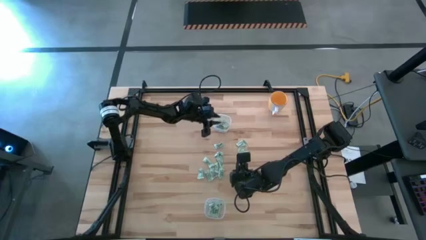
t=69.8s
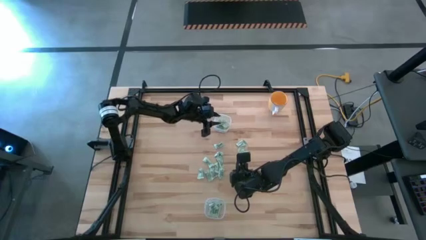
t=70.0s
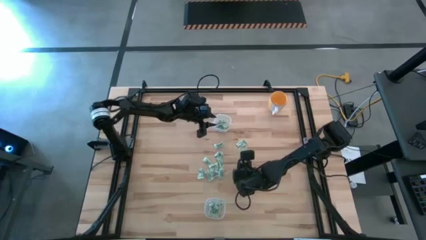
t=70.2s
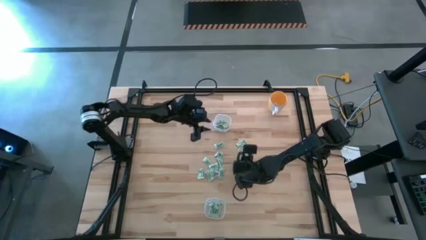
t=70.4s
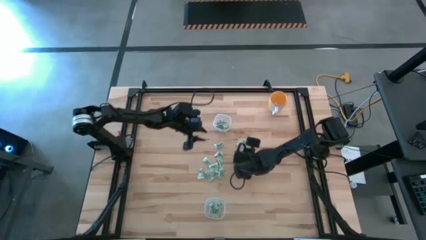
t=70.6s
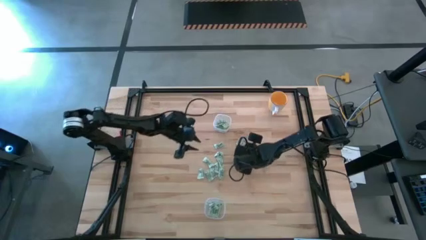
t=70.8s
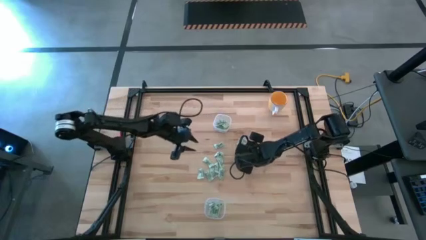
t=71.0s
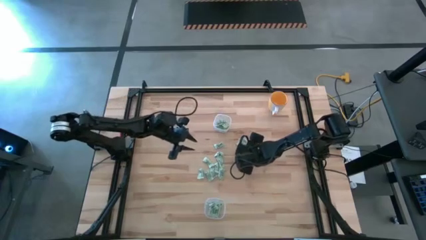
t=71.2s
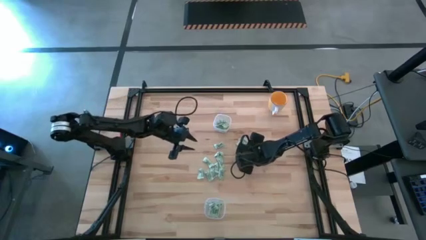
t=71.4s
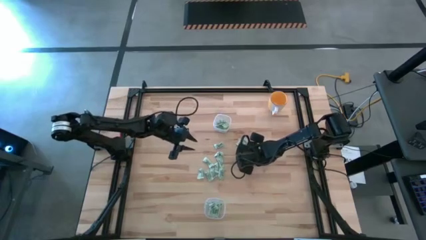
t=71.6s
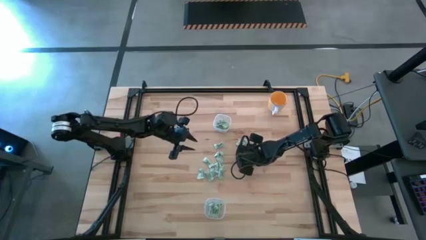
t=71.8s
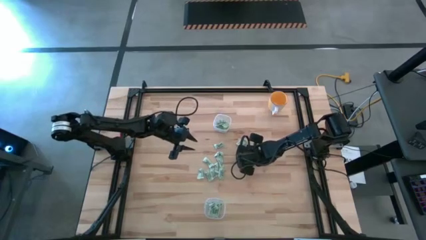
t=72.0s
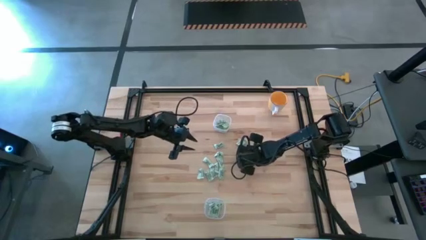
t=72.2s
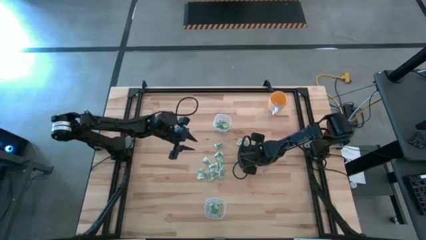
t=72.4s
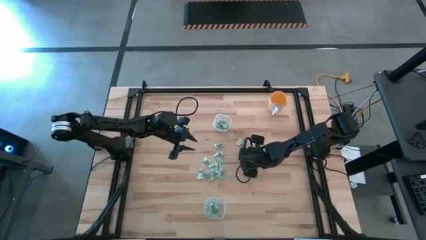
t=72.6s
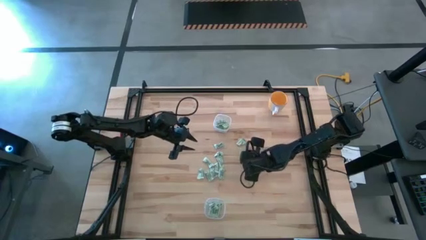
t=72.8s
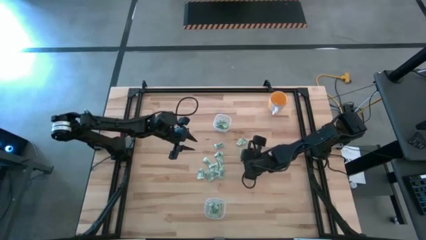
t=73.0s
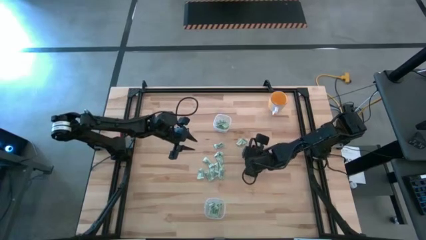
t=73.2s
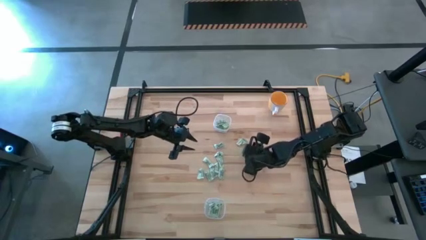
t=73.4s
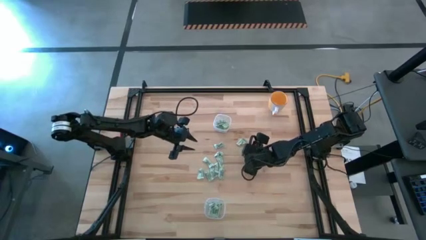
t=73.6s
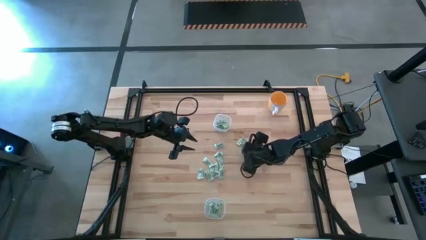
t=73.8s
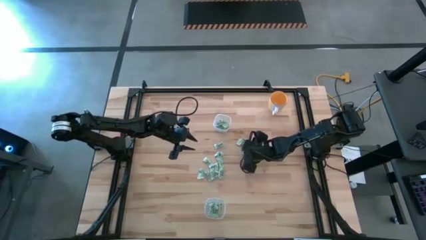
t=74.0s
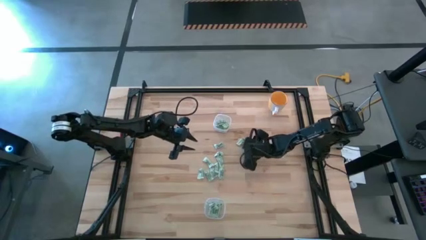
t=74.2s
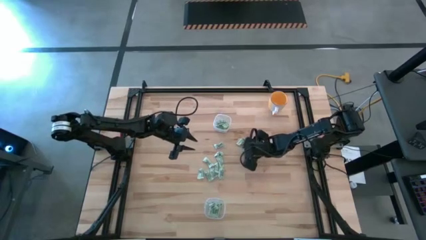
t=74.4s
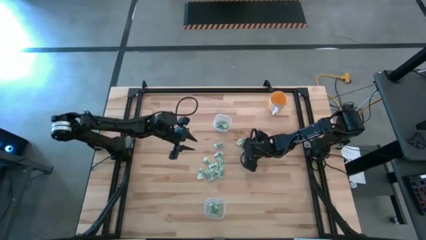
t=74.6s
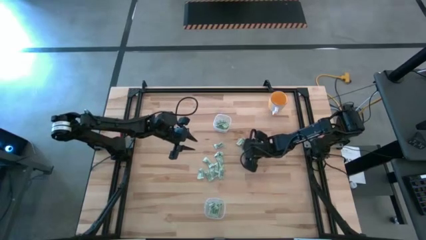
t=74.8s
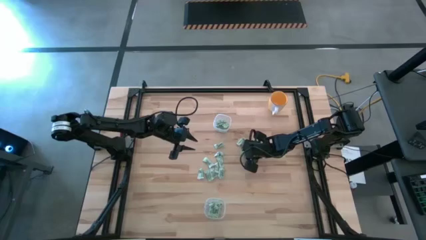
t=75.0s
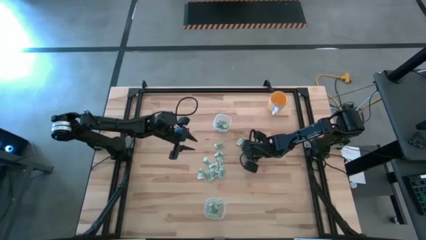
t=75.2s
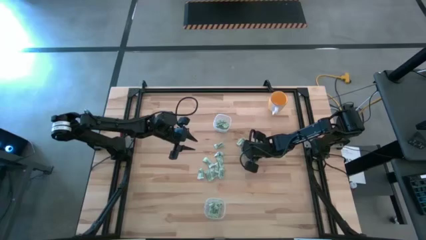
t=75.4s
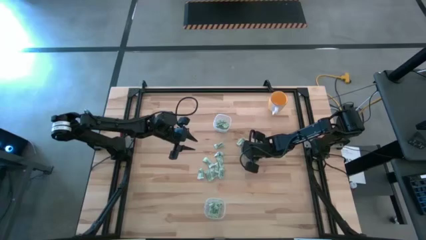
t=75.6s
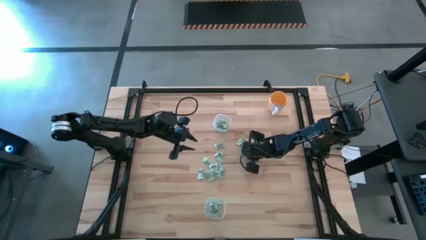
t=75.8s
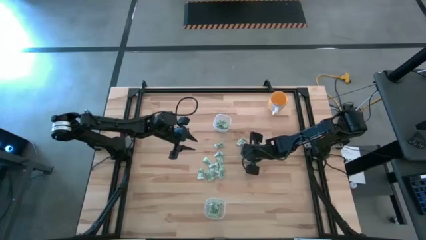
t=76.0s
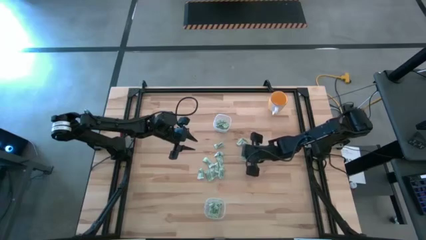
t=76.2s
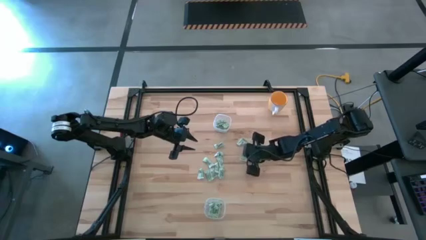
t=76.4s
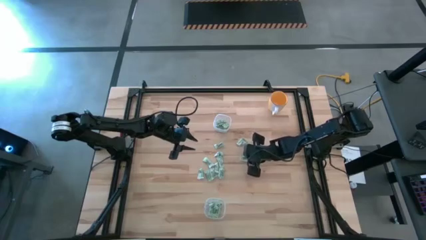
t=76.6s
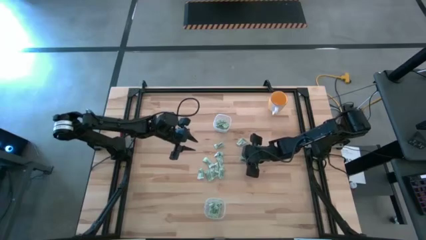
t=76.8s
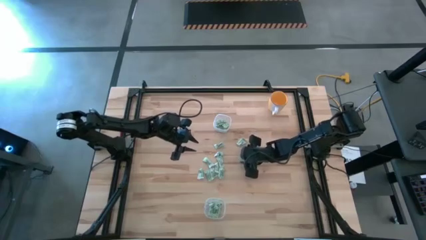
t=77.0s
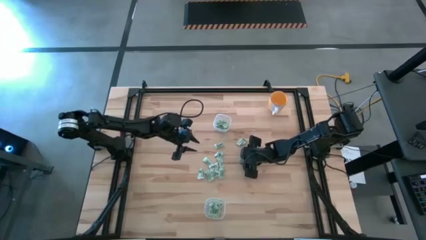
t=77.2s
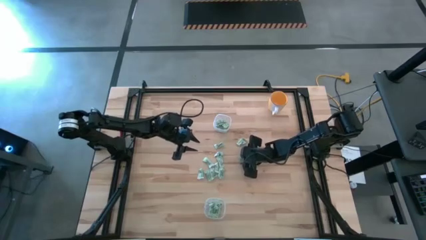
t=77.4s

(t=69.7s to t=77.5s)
Task: Pick and place items into bin
Put the stevia packet into the bottom transparent bin

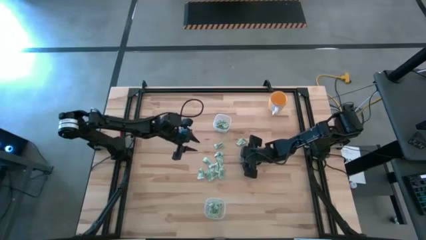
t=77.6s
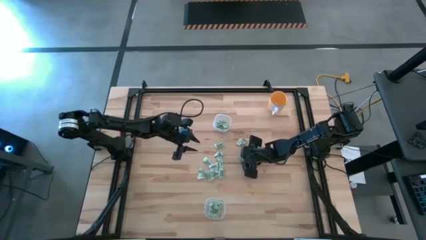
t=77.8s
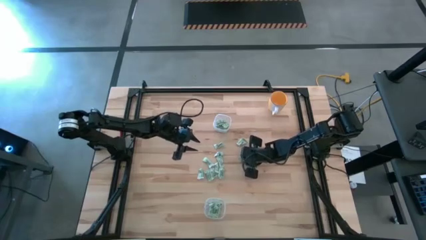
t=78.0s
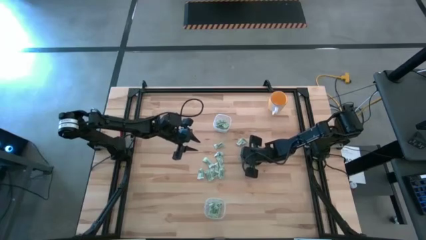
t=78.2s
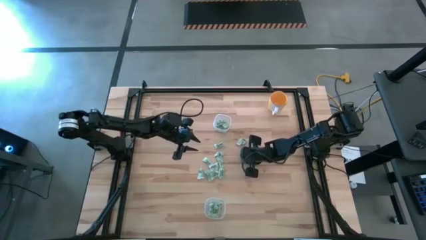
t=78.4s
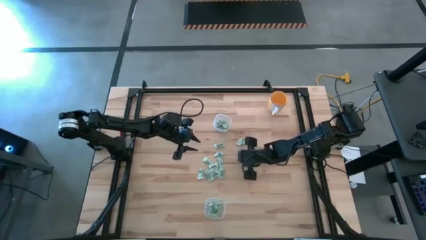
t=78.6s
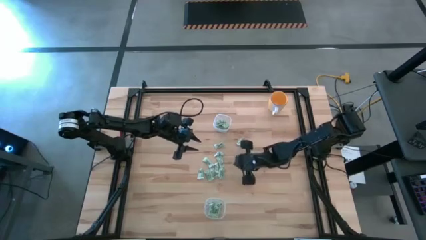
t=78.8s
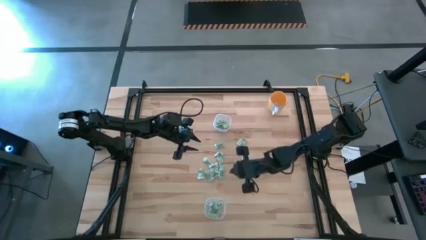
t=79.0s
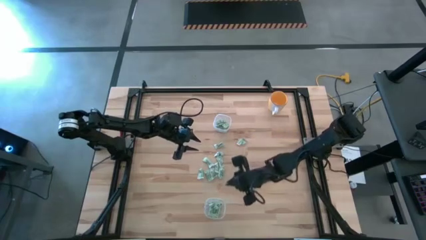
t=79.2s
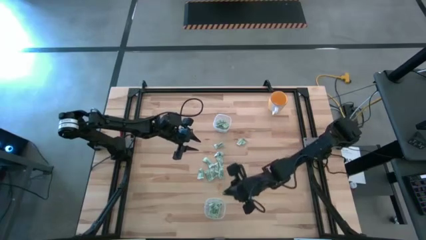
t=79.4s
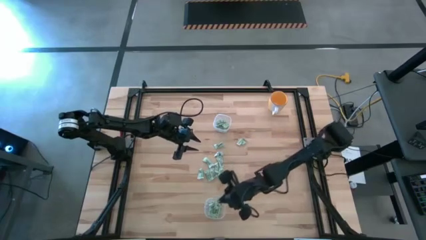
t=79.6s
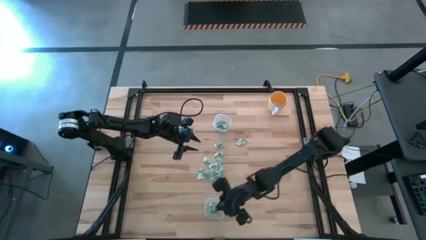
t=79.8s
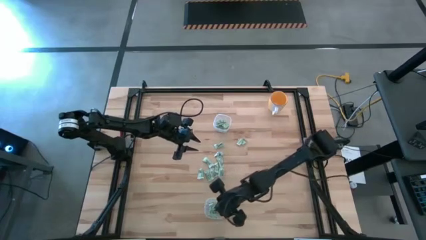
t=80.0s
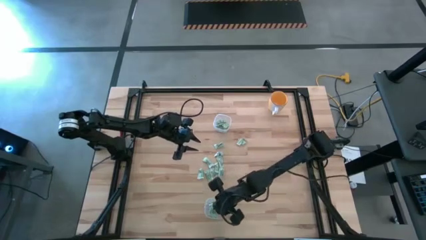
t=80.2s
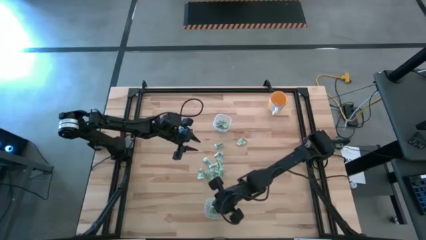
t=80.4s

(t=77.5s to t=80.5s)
Put the stevia packet into the bottom transparent bin

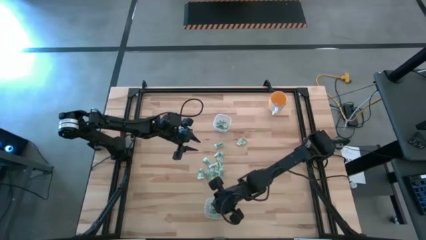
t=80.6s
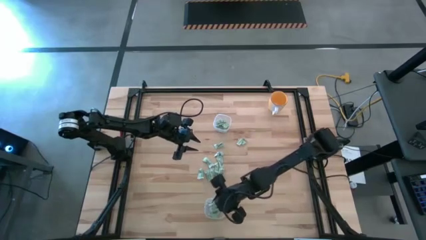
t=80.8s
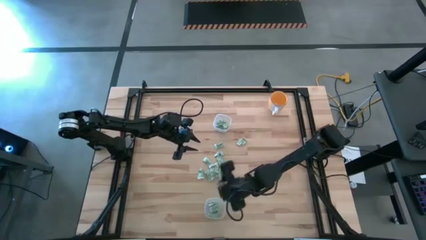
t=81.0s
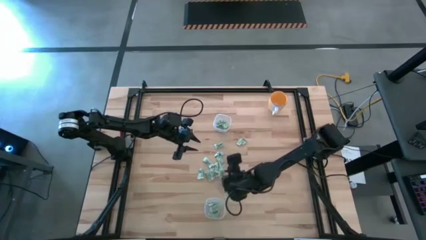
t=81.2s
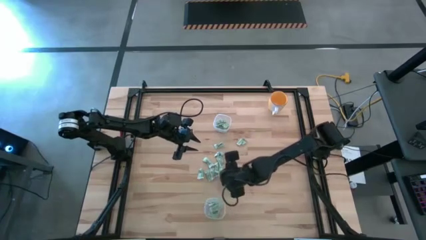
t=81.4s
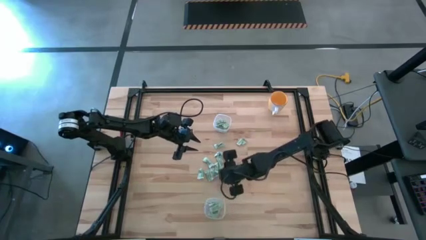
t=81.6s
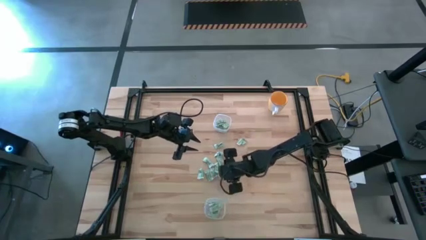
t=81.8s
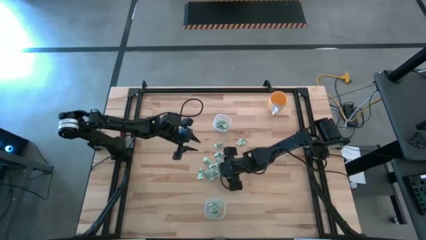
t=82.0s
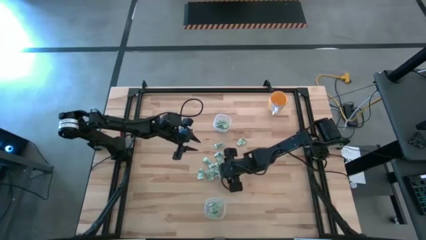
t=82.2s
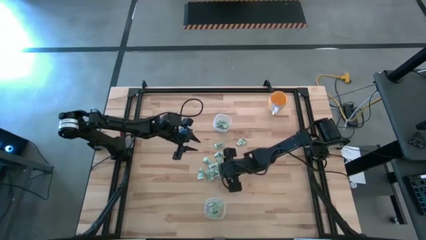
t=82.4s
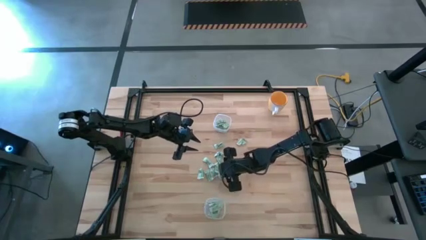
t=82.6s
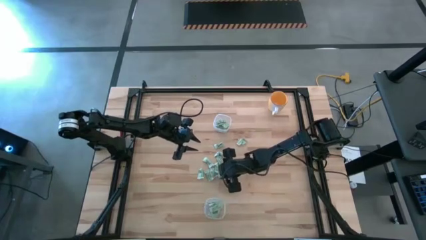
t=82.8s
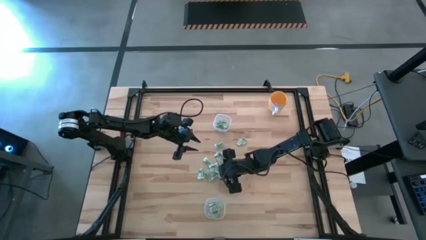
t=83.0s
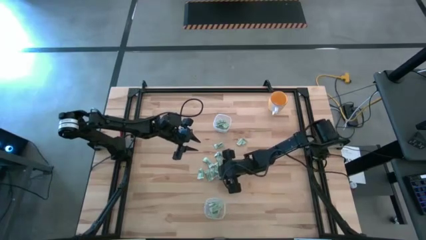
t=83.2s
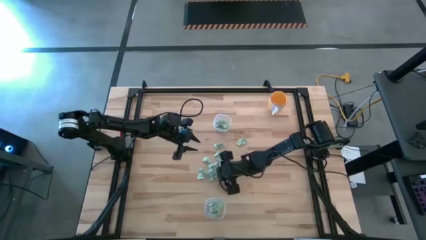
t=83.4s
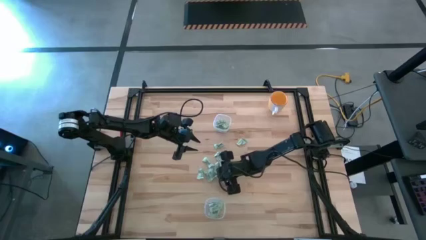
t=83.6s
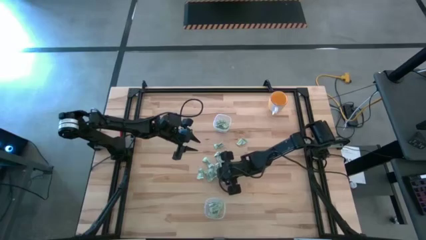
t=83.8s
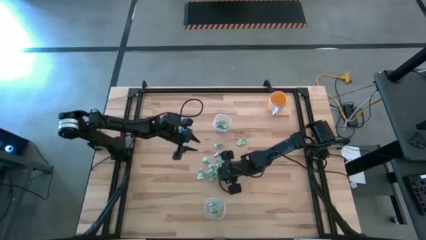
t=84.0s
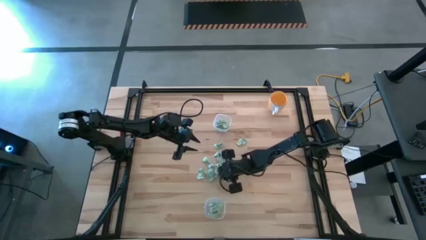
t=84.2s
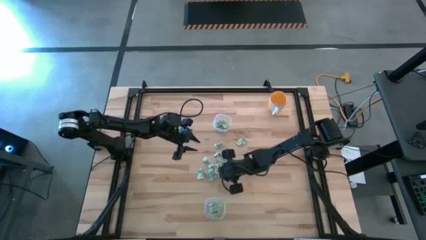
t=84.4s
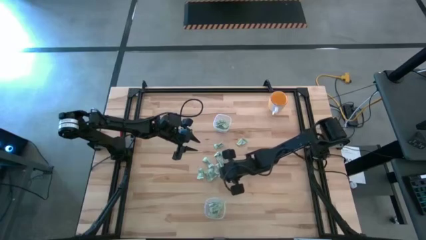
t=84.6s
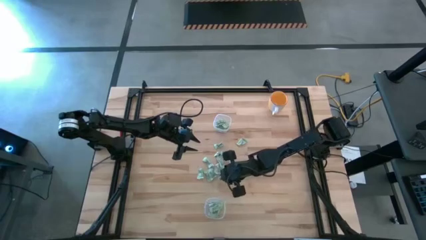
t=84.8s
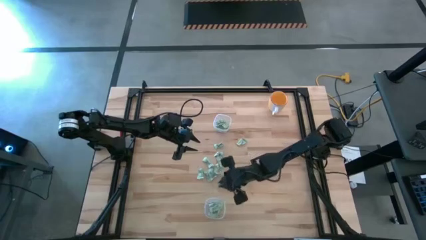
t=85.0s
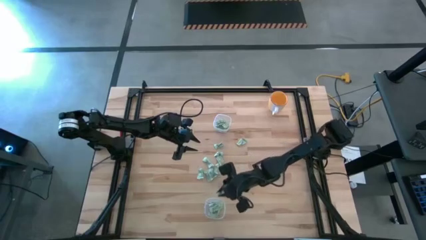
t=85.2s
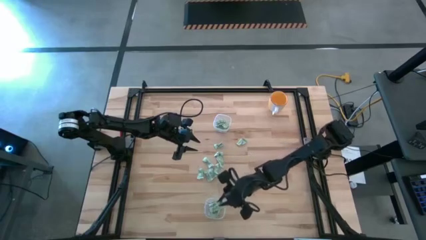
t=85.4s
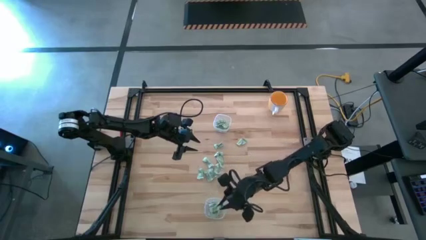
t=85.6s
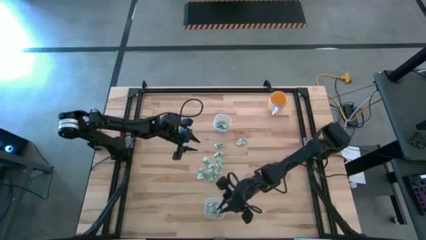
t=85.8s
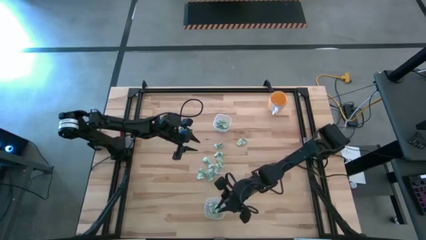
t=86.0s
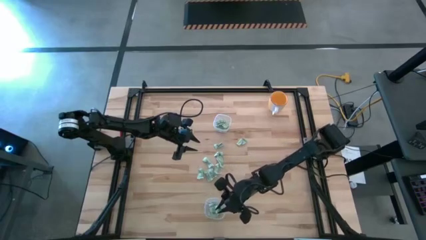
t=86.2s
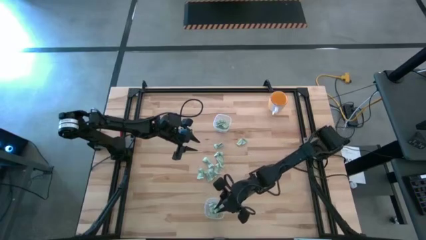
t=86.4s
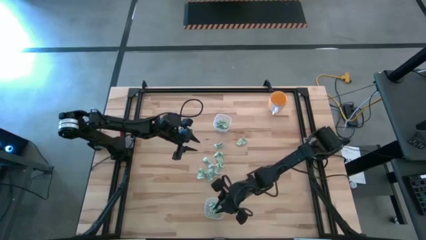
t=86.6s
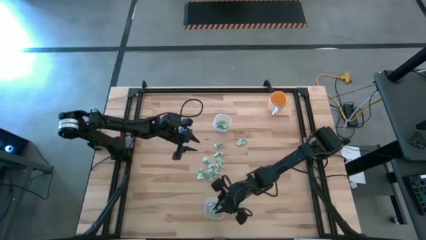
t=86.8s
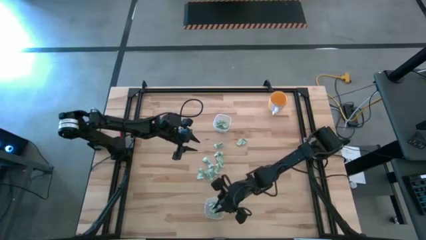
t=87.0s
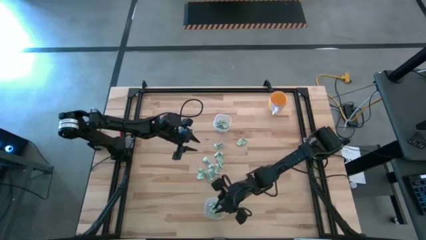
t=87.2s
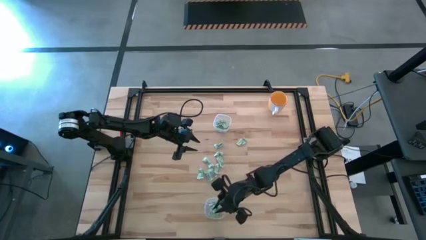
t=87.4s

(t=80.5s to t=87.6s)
Put the stevia packet into the bottom transparent bin
